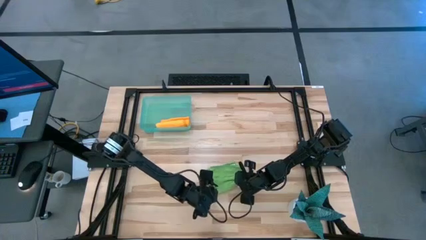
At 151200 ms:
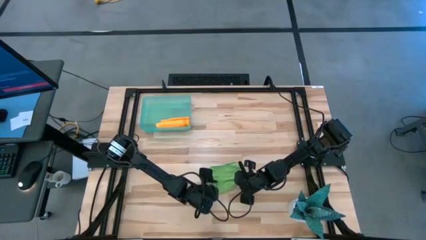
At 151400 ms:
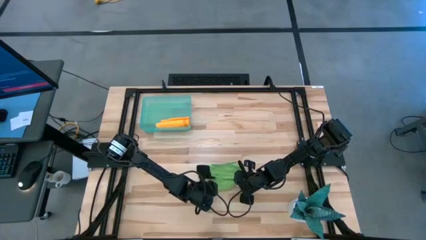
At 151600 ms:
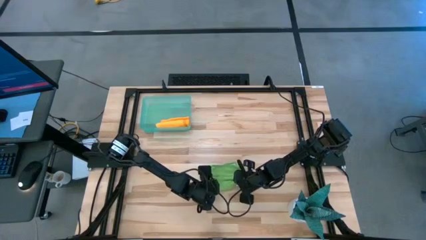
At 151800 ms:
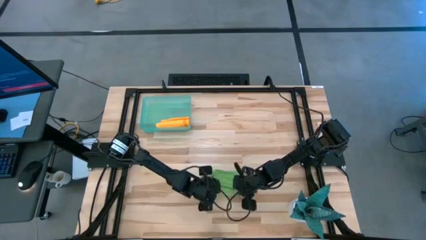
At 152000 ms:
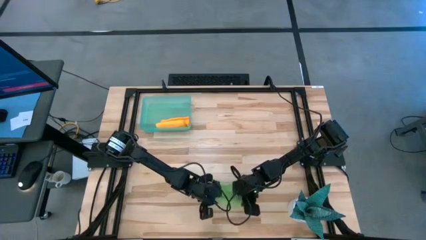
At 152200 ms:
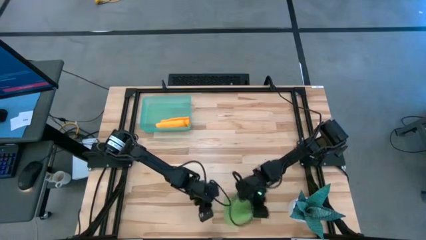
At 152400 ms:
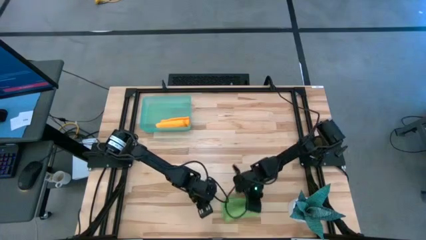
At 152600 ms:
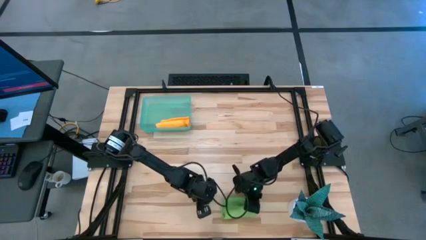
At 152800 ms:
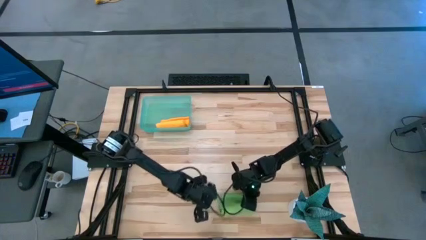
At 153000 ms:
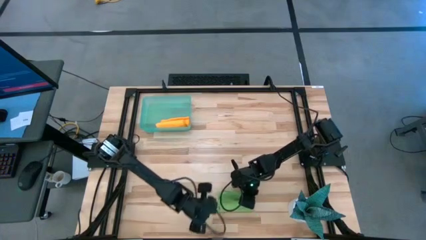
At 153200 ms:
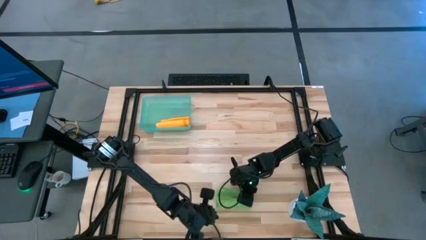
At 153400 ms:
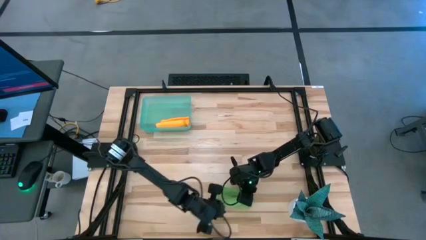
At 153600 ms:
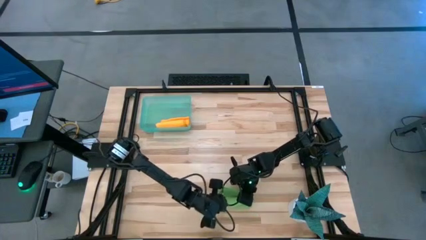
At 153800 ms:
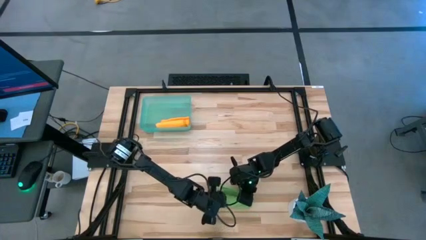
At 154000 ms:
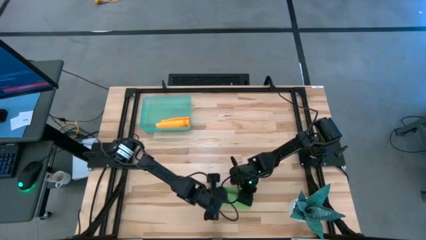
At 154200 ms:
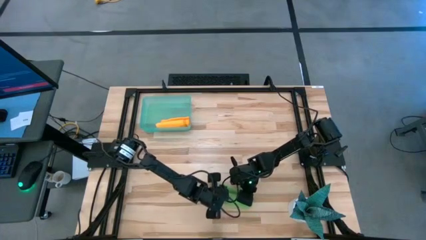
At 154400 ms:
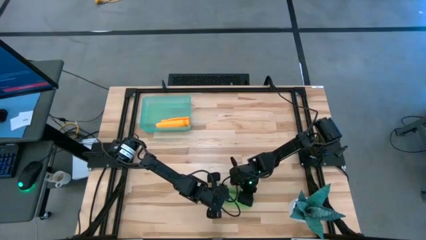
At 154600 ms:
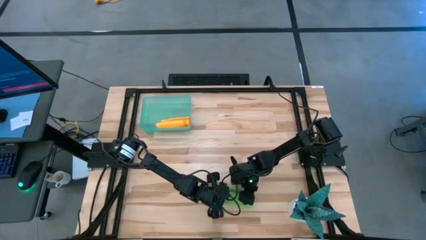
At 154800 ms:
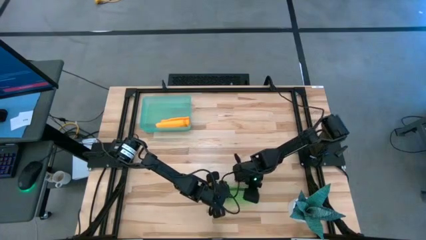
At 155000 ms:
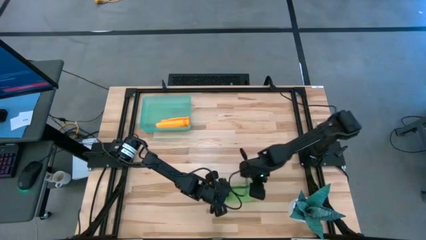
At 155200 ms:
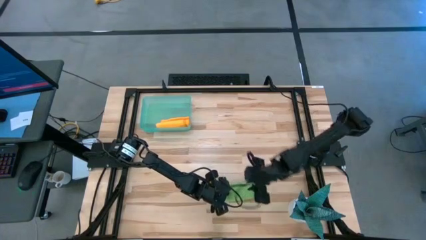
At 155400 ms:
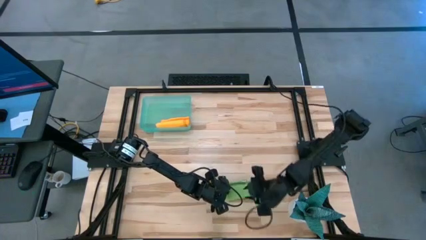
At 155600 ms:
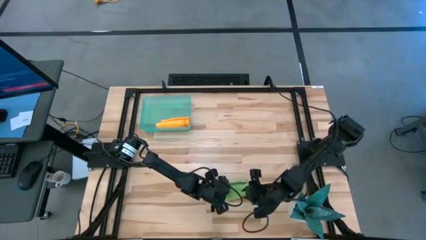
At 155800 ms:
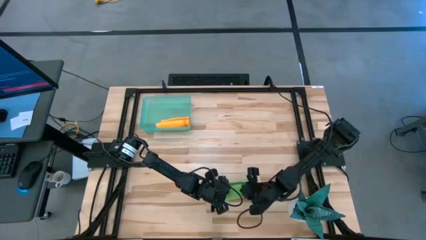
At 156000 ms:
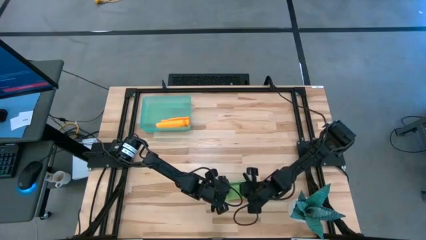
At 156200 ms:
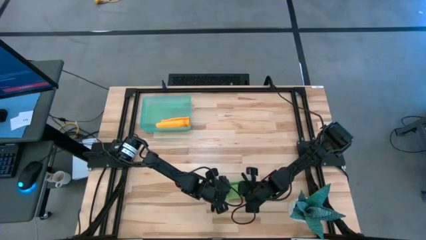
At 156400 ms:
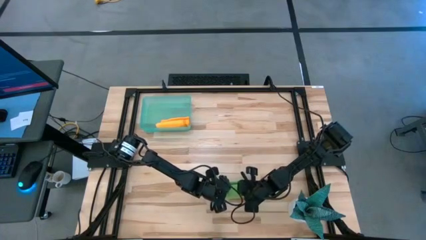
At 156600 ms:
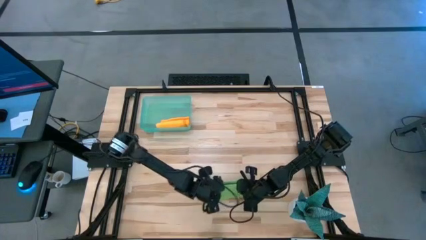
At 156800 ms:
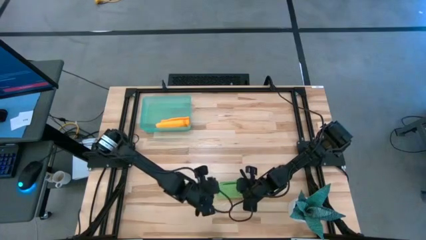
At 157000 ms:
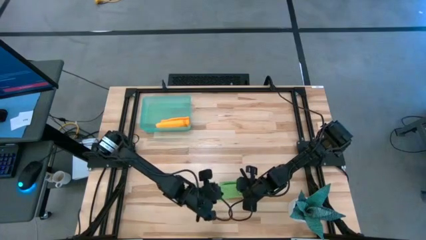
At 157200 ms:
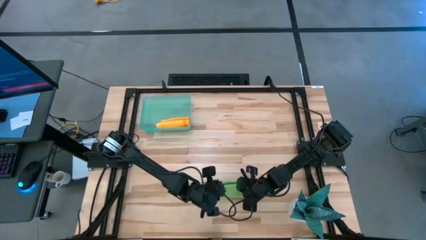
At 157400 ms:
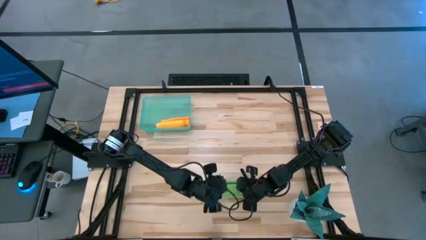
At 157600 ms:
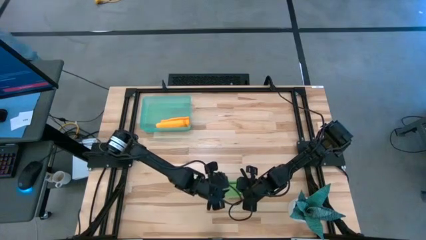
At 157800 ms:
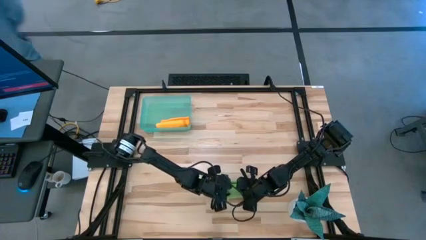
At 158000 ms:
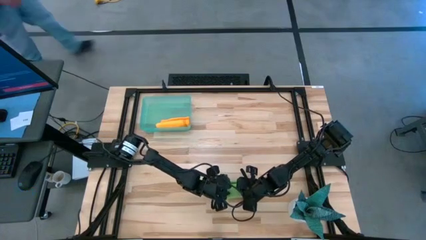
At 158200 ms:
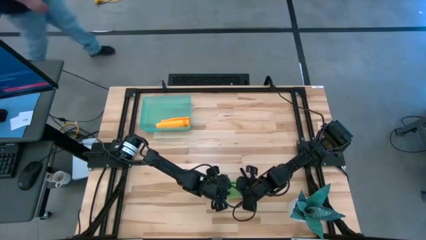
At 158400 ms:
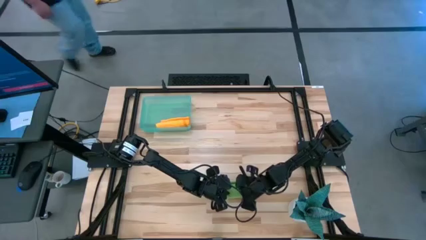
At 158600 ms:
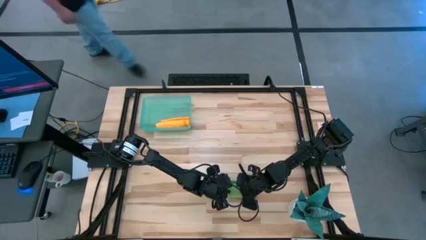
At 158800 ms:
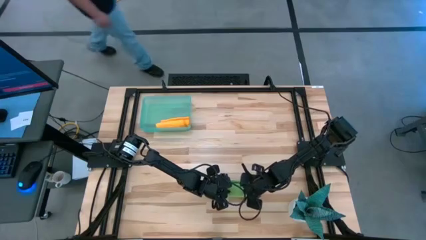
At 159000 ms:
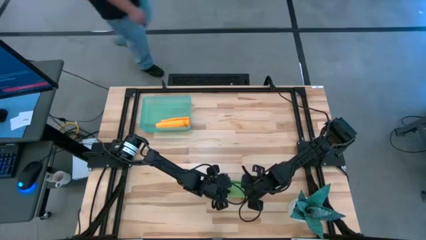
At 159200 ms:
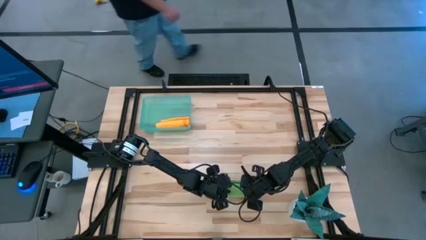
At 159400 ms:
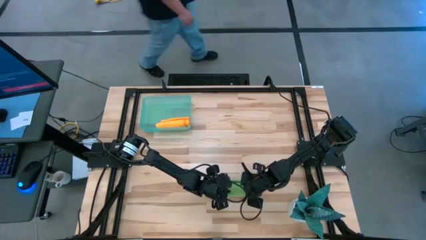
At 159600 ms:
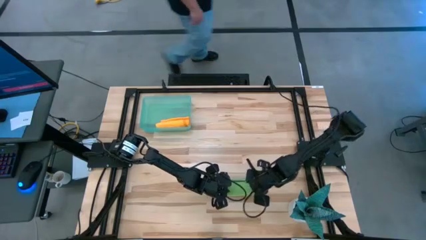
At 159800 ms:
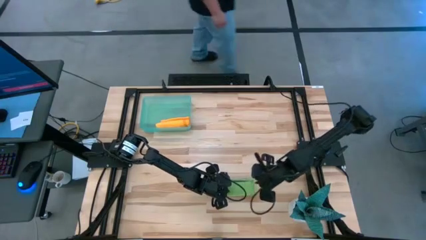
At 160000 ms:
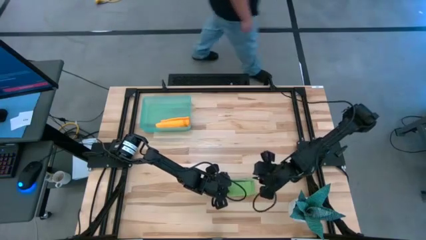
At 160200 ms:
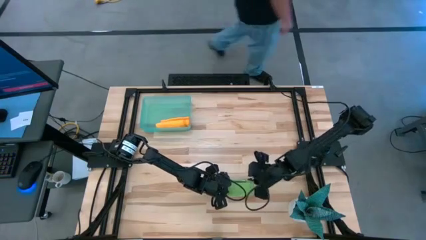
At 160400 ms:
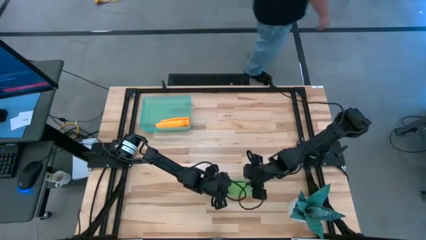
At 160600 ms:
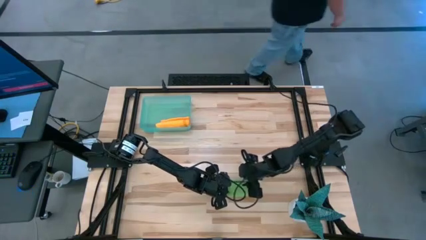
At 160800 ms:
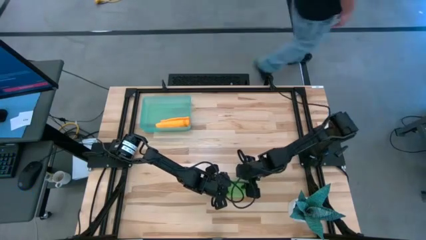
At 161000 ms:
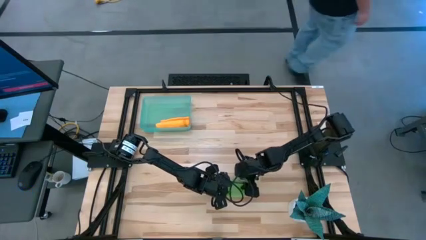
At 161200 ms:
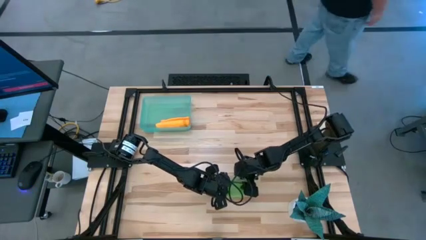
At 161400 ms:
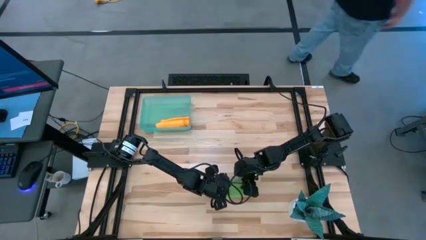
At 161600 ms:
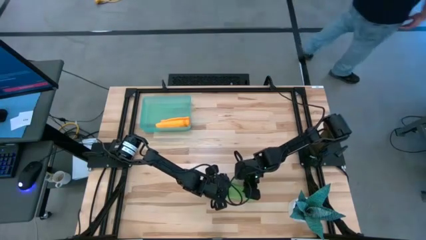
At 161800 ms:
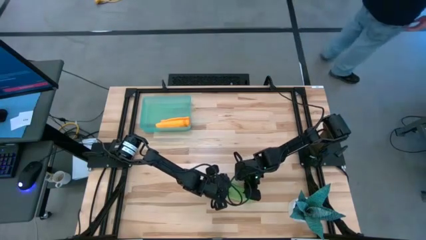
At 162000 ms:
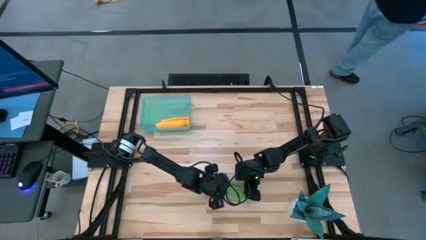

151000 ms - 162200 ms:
Task: Roll microfiber towels into tight, uniform cylinder then place into a basket
Roll the green towel

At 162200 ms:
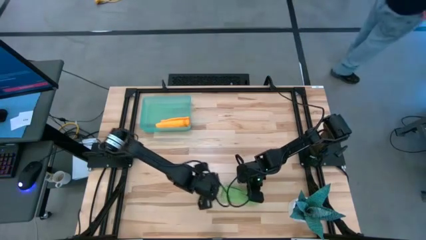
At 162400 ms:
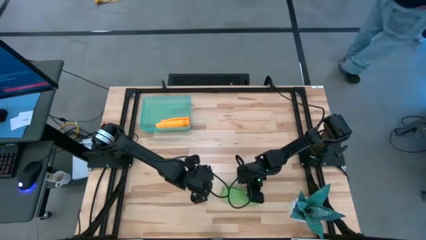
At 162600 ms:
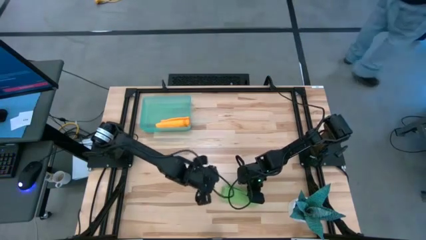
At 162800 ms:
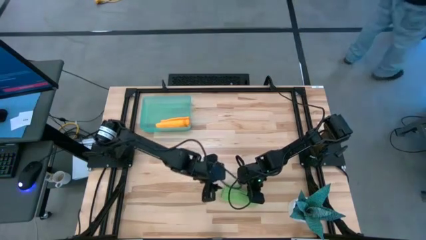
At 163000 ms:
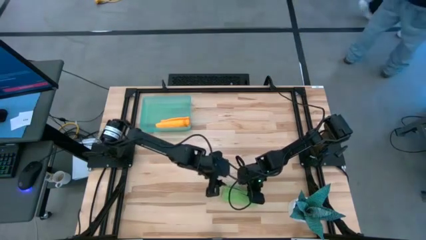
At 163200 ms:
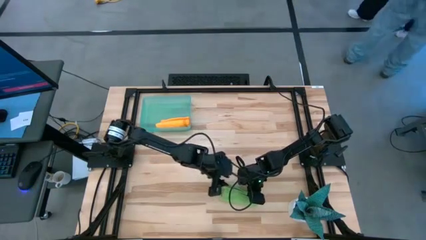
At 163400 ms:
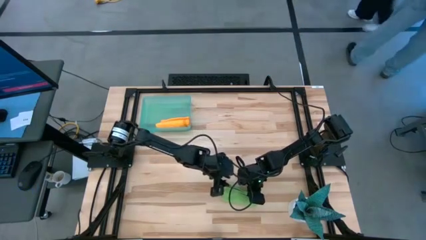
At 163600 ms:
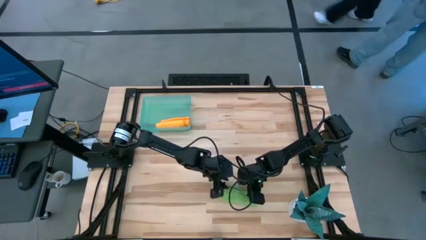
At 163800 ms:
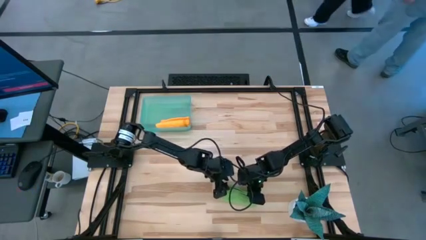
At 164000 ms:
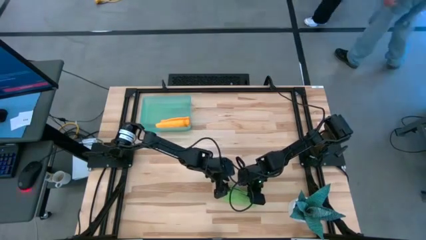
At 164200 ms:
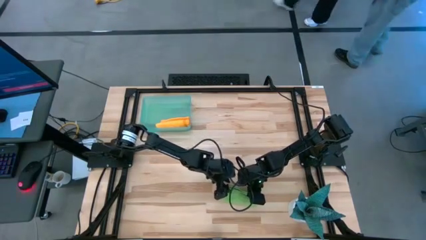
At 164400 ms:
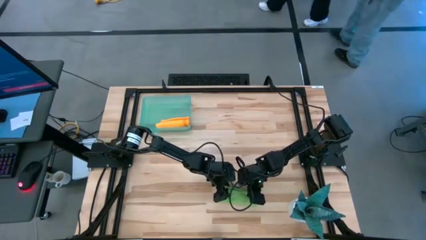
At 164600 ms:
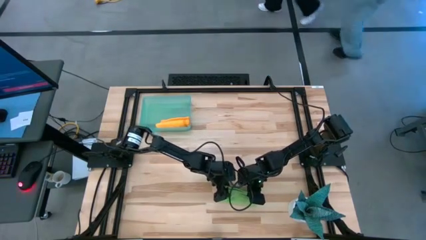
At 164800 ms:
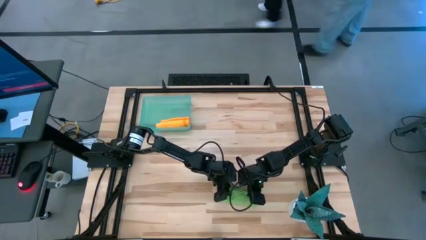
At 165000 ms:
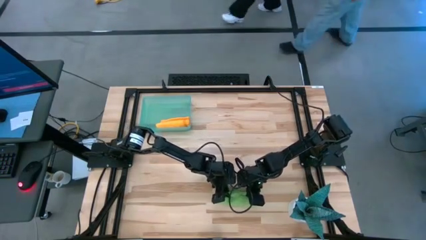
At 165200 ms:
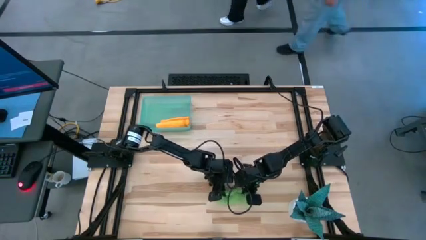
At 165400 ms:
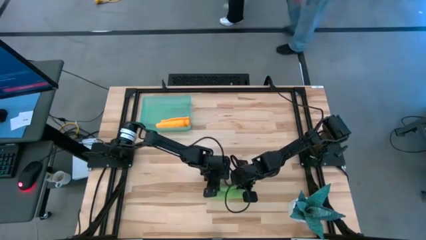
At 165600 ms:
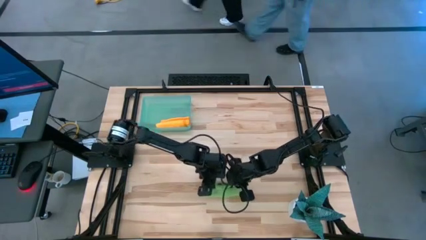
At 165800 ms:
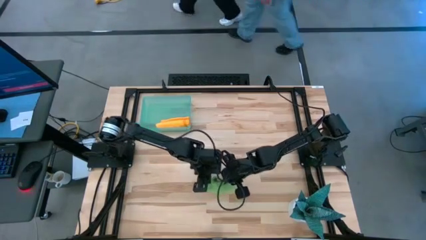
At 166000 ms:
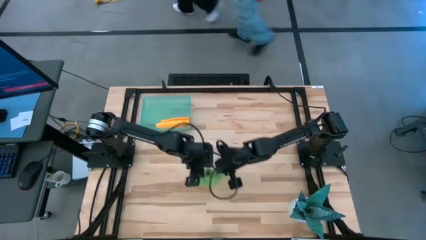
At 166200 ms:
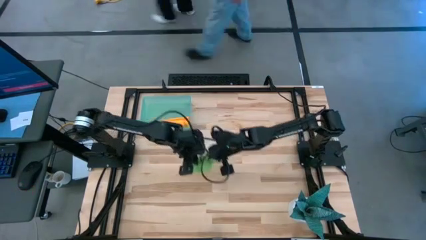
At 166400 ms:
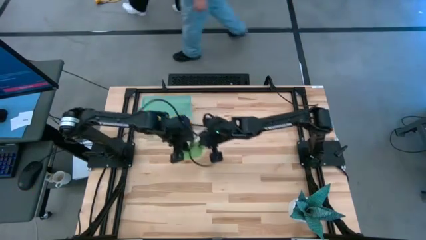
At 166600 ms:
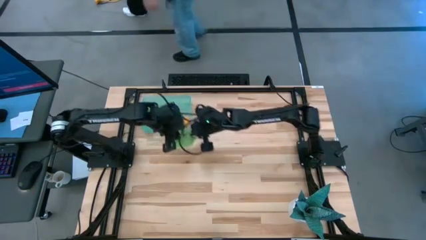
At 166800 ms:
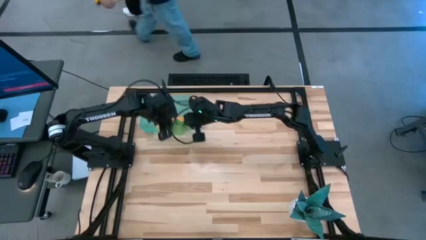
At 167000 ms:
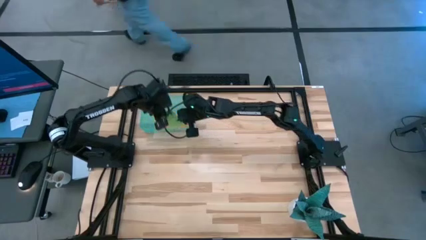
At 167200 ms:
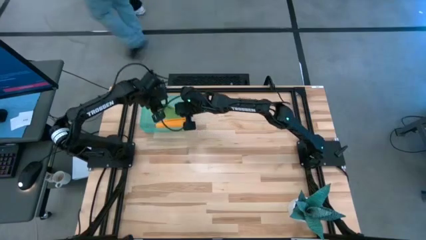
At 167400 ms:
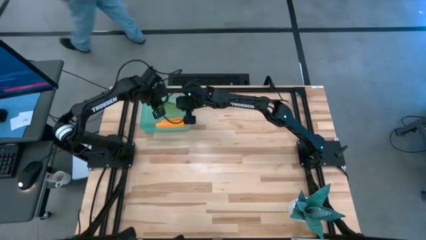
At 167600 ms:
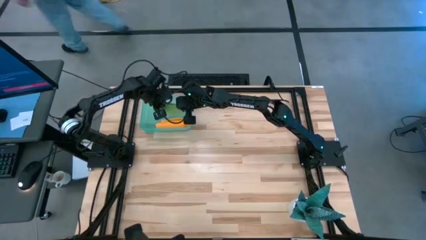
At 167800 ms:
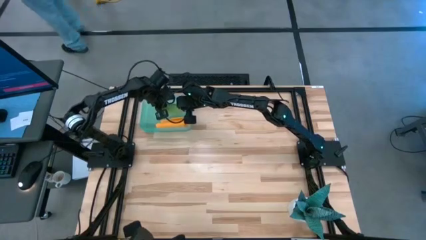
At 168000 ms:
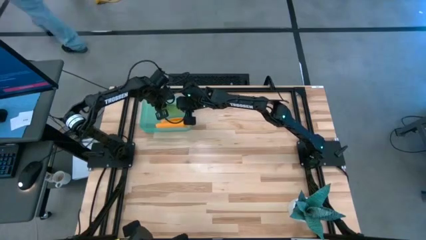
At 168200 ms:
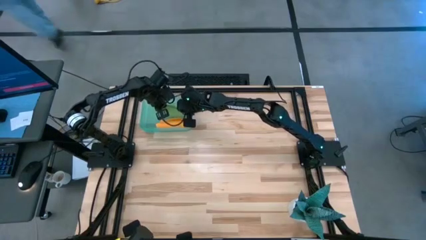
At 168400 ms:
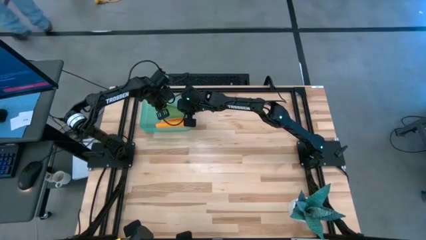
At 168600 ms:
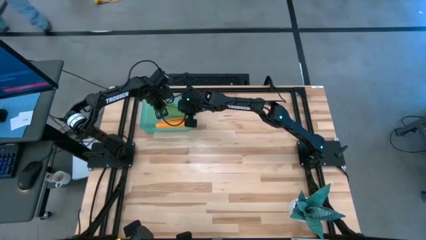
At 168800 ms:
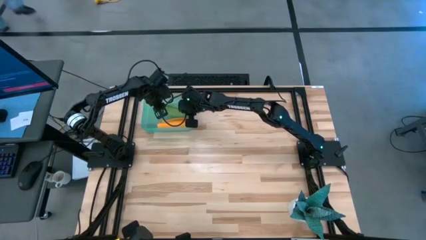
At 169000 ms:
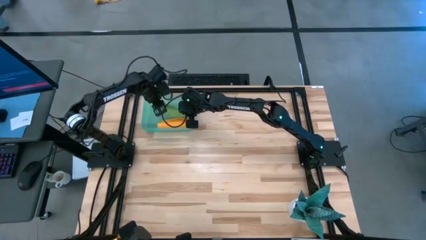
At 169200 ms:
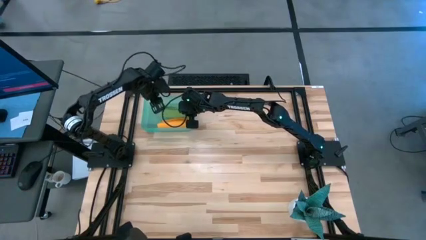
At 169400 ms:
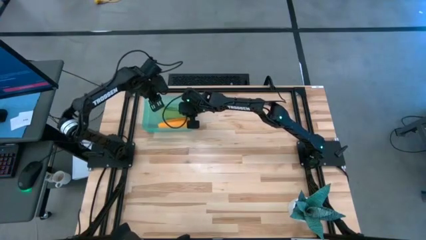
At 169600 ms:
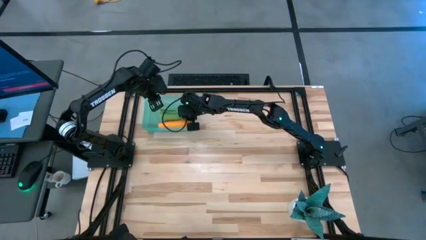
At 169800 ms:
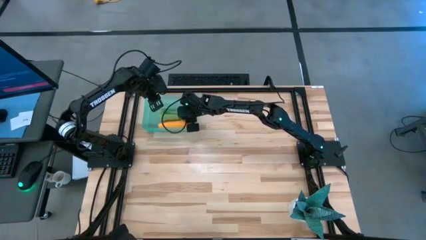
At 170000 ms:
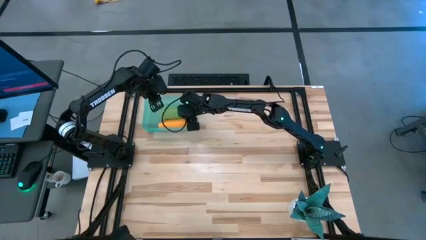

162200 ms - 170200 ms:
Put the green towel into the blue bin
